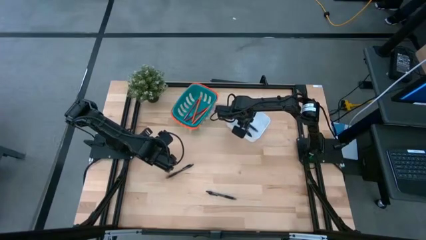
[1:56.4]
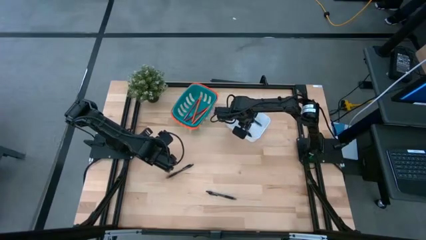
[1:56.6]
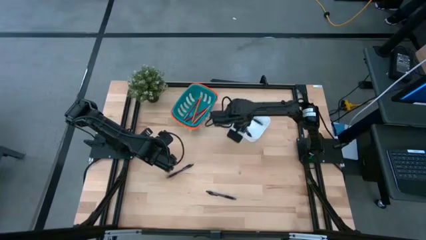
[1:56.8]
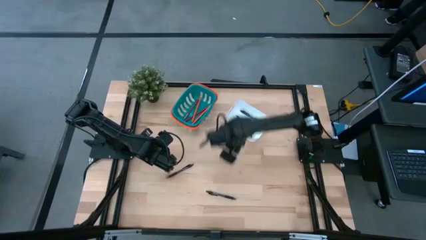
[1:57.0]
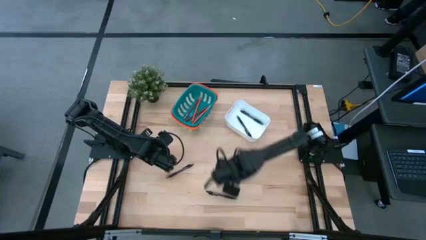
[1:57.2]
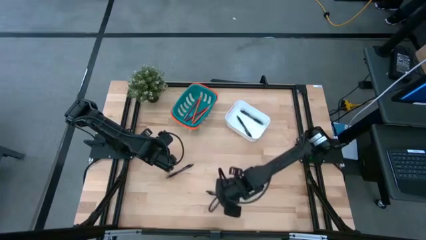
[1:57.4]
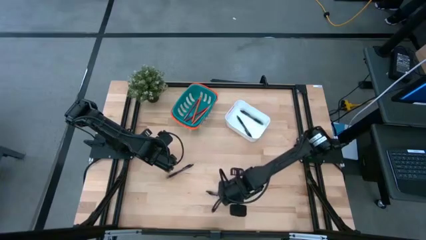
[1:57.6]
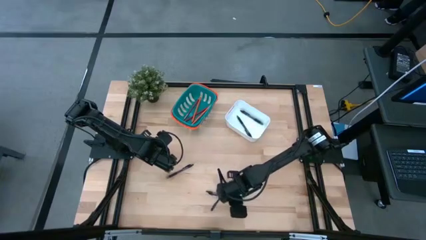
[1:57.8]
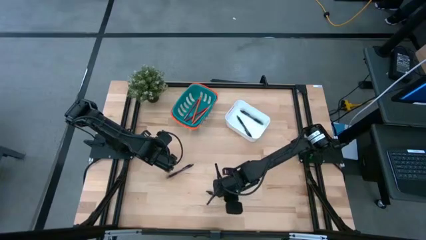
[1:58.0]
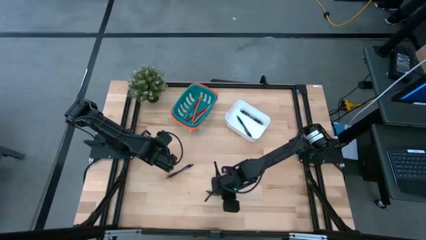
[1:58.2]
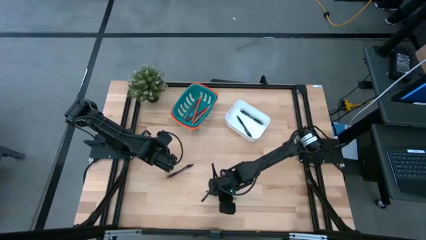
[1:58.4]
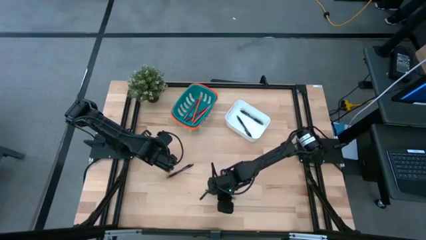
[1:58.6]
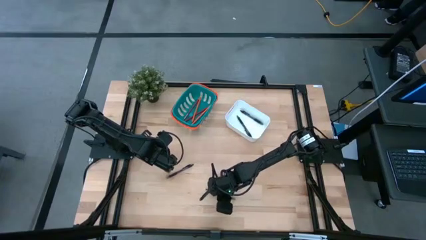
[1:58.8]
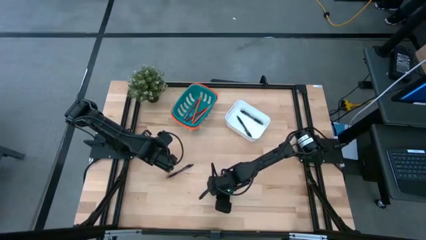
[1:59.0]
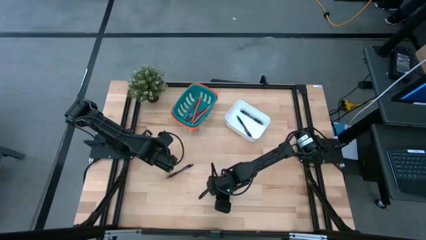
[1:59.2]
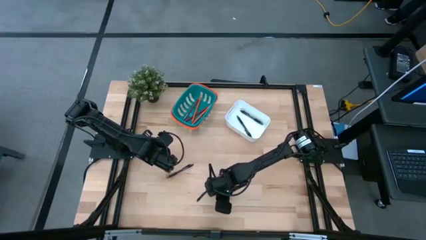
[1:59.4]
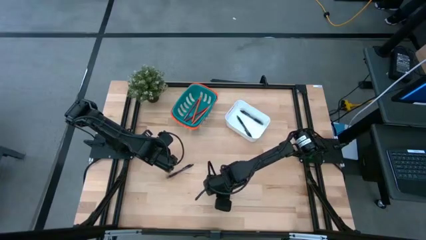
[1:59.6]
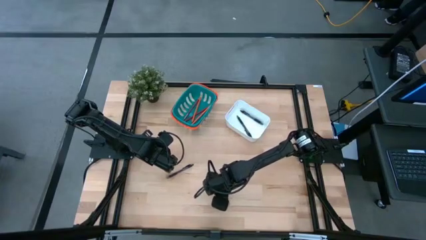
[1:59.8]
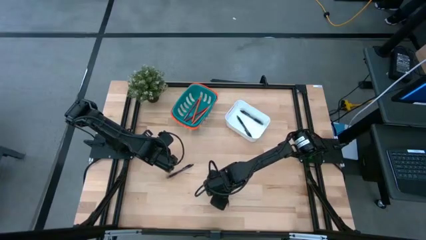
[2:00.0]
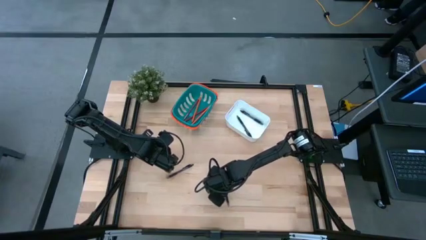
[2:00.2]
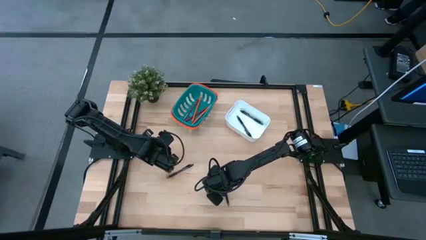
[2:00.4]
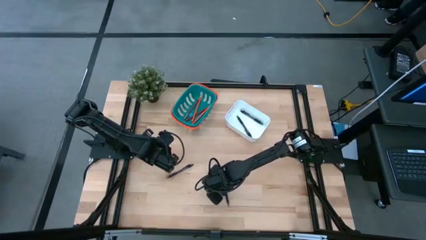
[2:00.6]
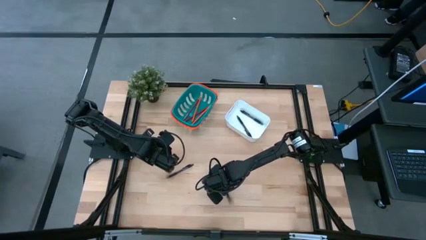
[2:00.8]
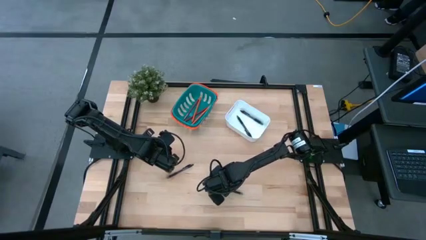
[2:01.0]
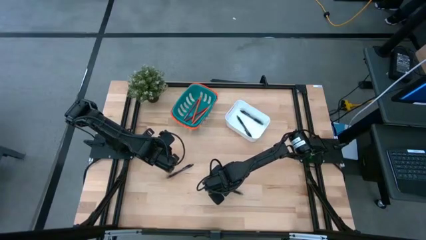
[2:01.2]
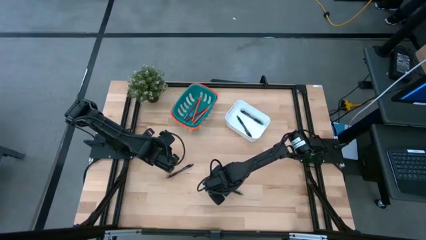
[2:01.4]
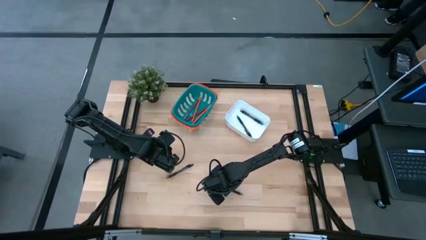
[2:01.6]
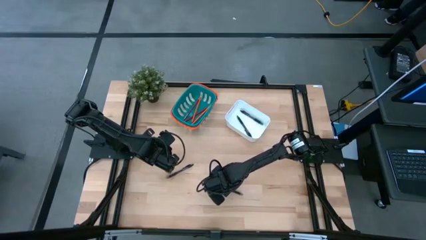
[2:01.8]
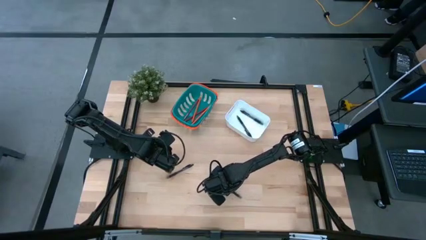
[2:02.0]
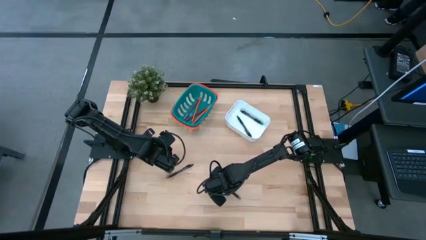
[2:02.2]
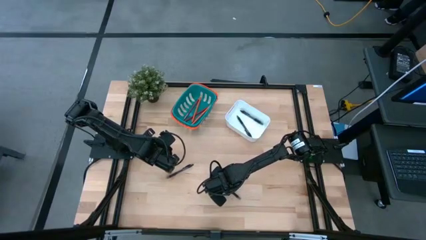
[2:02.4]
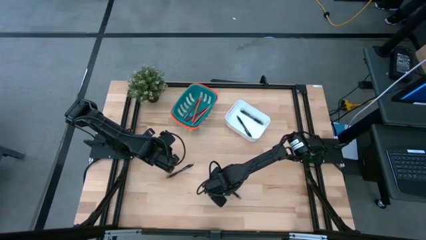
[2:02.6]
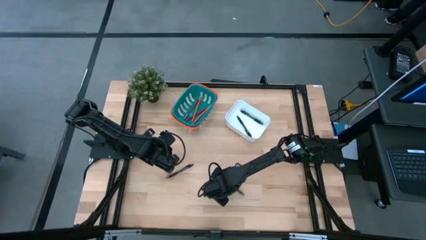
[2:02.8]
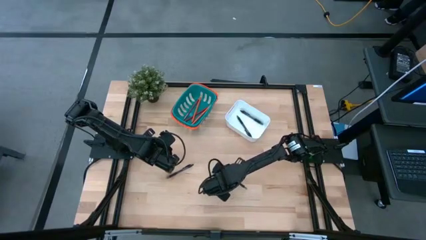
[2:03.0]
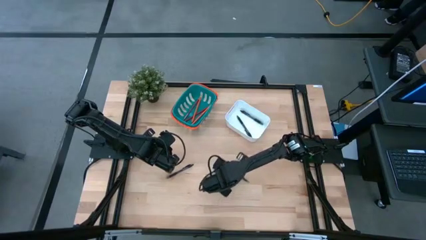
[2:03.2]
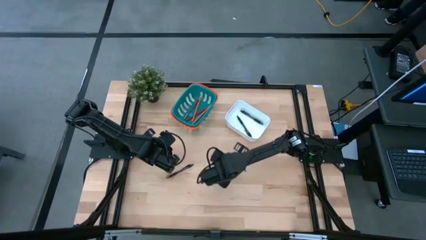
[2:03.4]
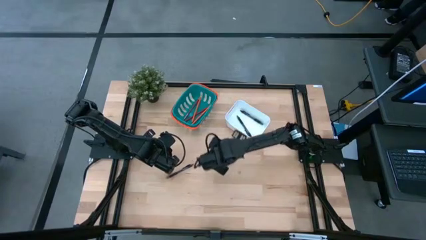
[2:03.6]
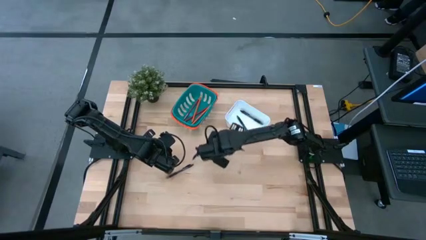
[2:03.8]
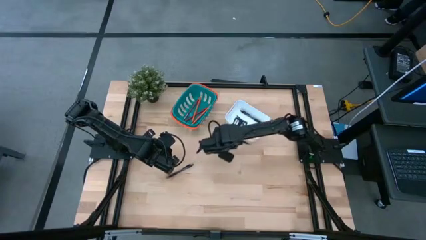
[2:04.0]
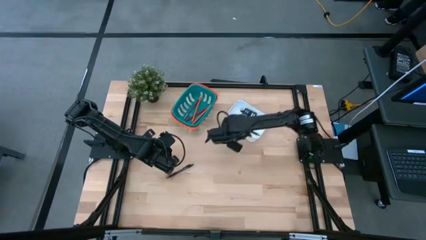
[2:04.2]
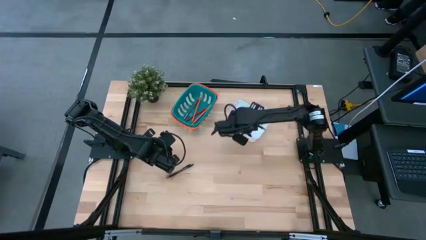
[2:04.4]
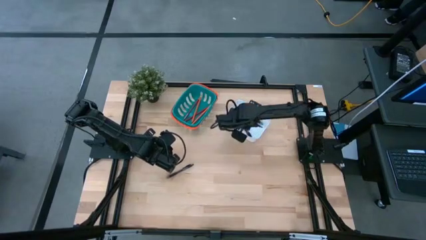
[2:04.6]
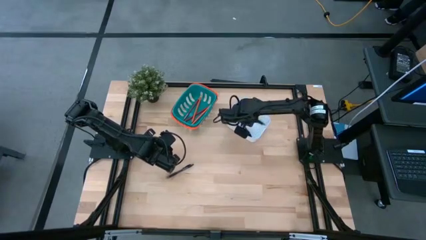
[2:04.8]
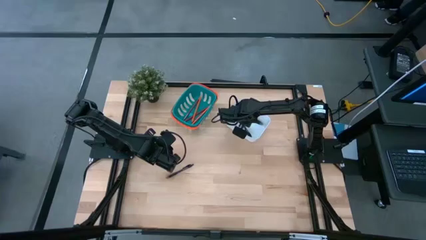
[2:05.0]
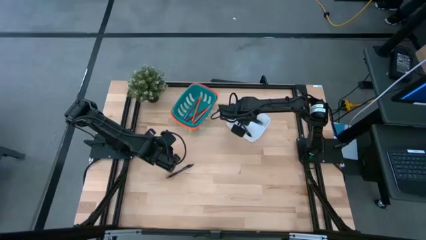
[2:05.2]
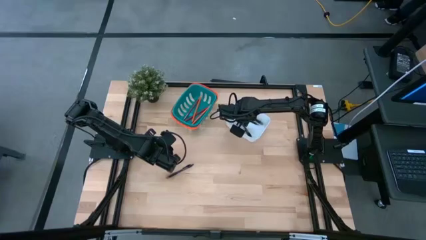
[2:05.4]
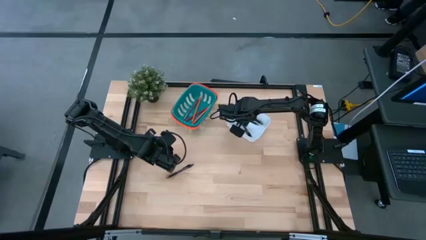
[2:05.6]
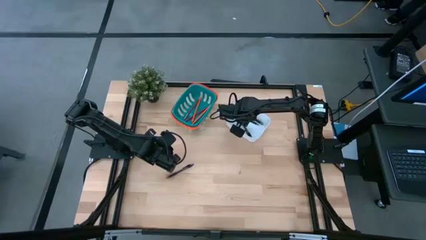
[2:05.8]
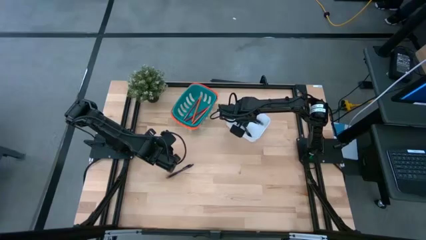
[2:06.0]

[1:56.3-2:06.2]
Task: Sort pens & pencils
Put the bottom black pen into the white bin

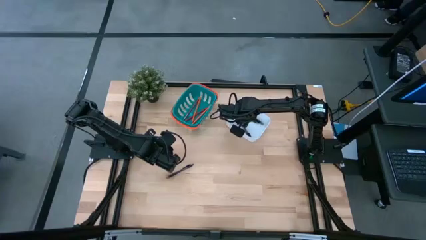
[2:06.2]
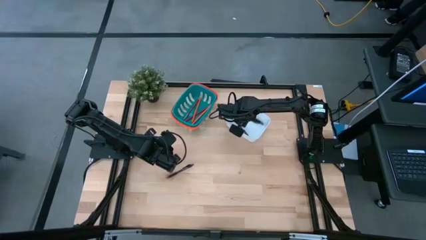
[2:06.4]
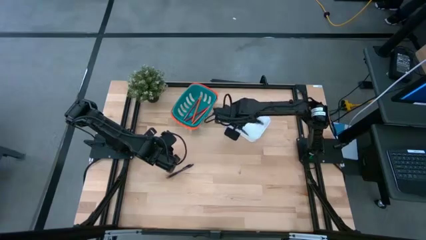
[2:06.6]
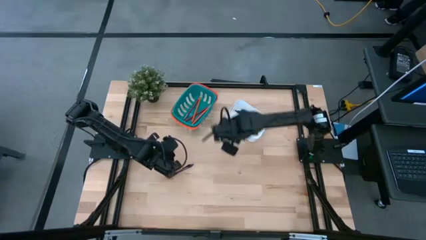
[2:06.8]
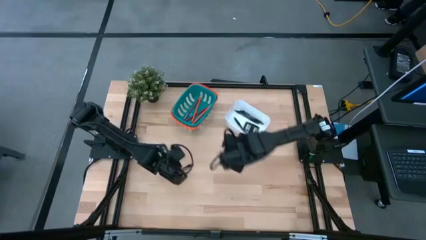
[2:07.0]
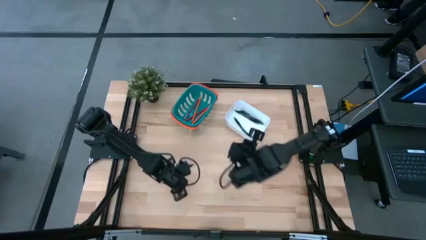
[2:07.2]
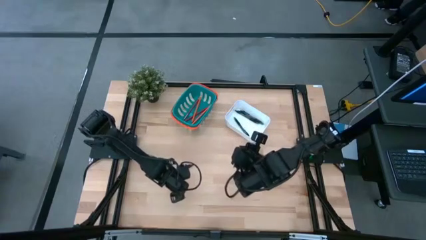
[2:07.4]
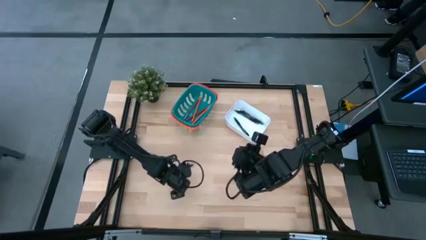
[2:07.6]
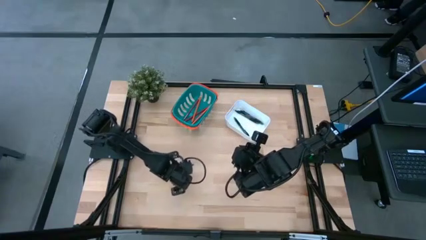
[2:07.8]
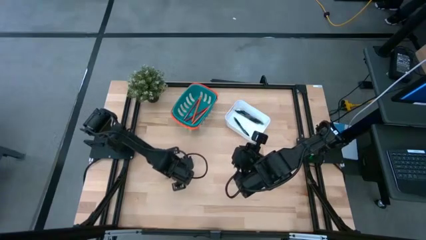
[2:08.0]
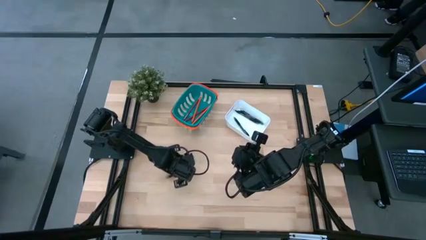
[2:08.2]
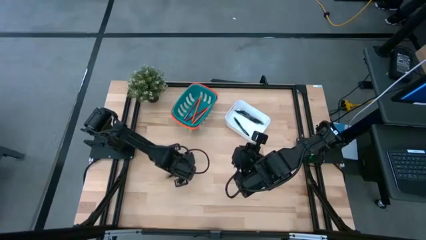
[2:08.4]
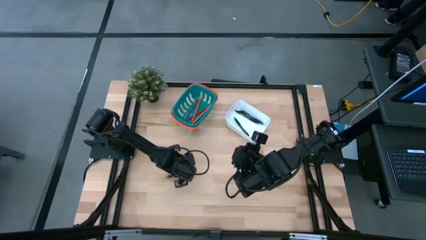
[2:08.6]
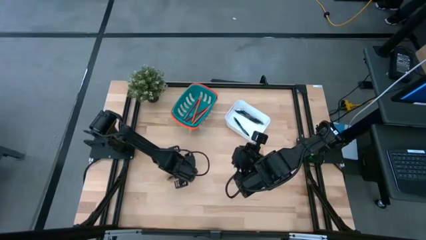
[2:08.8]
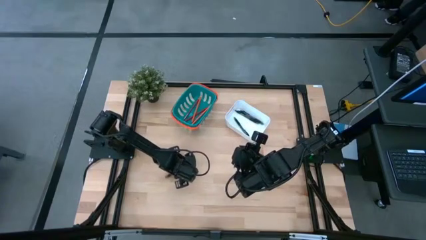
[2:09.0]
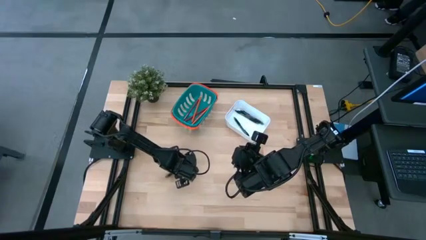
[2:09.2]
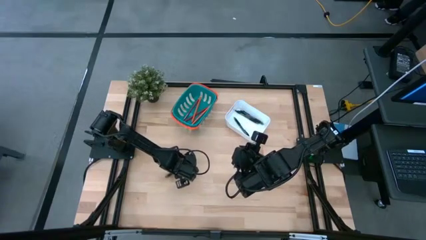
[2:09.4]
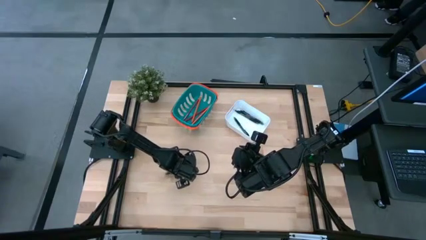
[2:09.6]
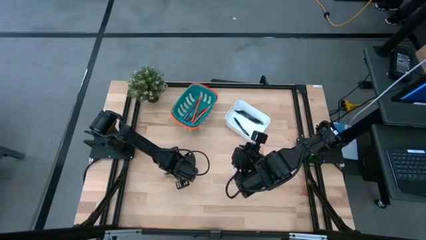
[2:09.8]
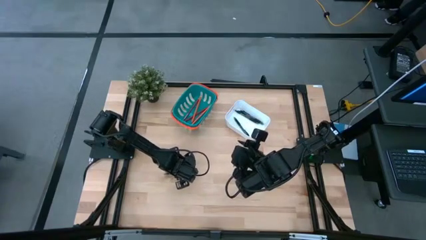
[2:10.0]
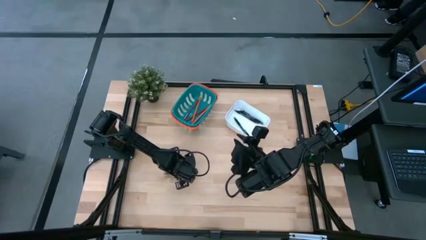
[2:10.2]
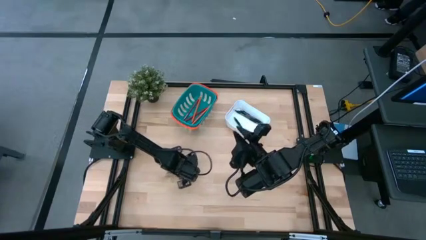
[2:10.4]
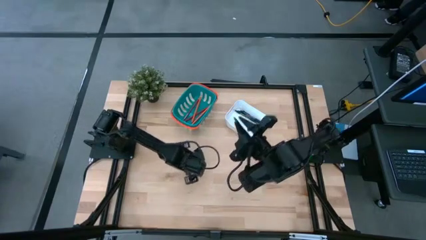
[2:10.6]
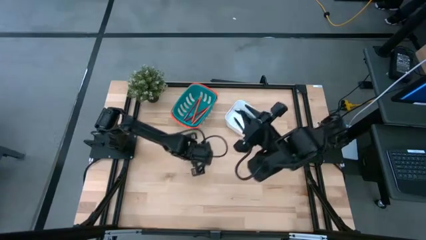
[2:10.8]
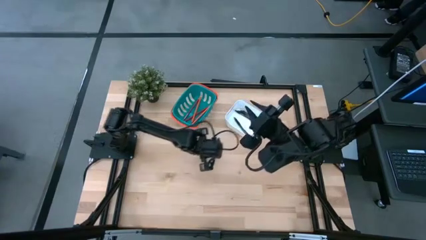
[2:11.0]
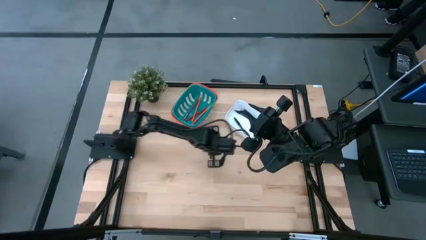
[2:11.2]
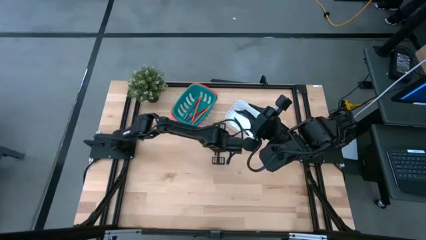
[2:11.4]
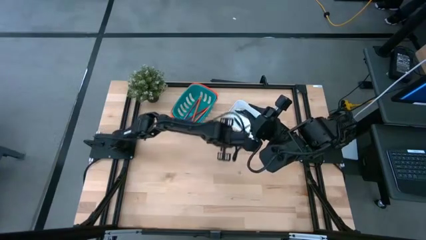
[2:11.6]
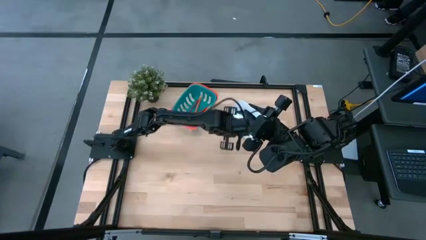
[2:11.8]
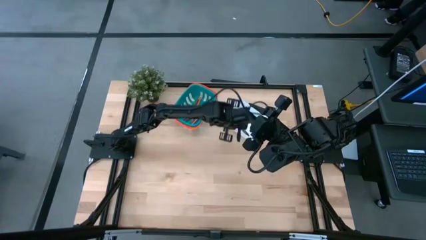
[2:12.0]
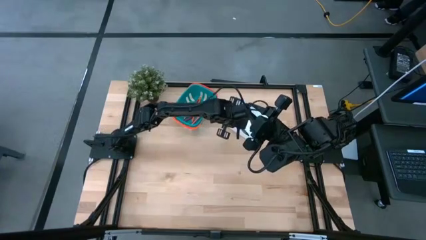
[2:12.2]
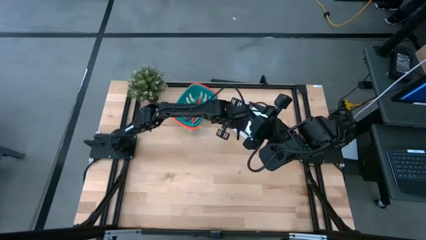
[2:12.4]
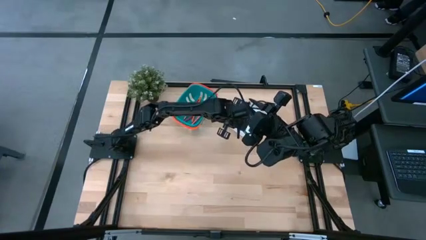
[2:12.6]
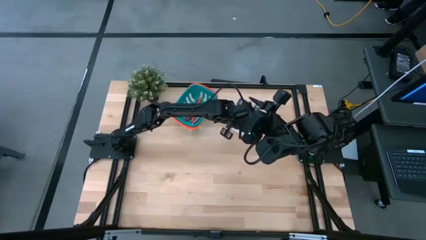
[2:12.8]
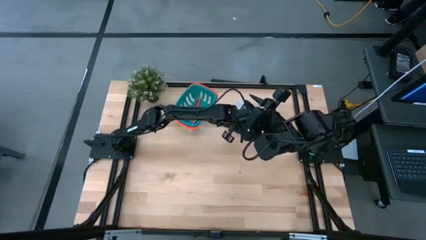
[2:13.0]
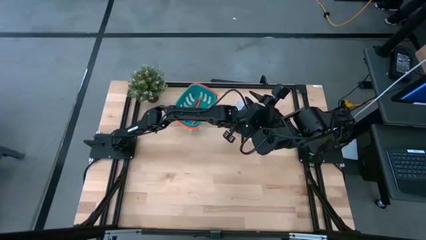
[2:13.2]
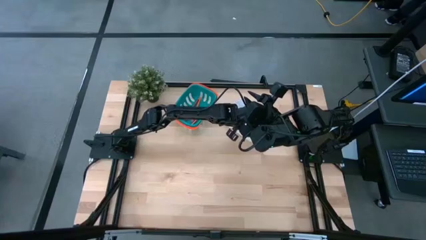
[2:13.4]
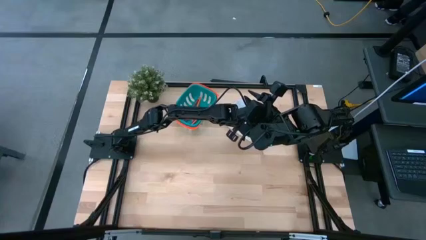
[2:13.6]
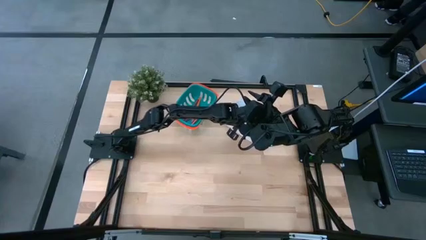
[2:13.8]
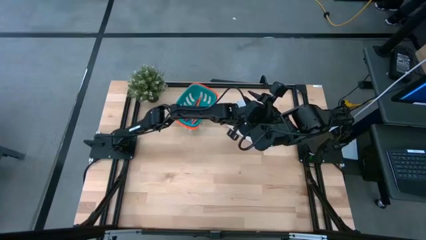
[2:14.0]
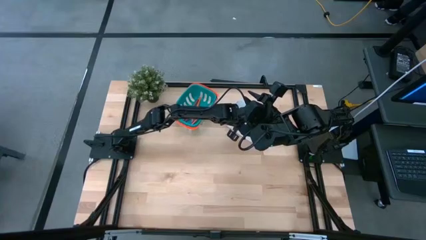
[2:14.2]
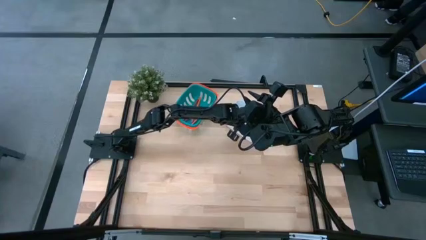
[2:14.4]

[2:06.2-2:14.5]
Put the black pen into the white bin
